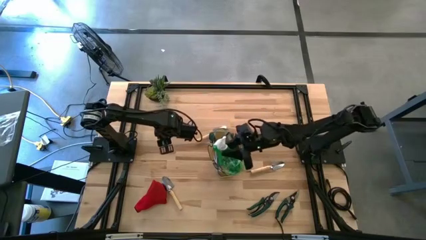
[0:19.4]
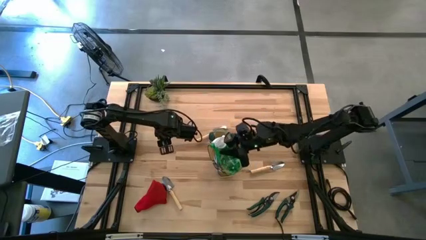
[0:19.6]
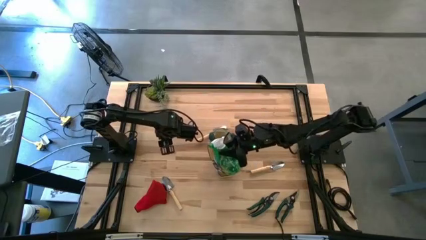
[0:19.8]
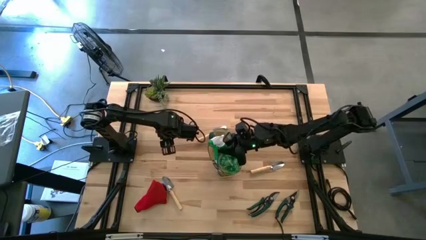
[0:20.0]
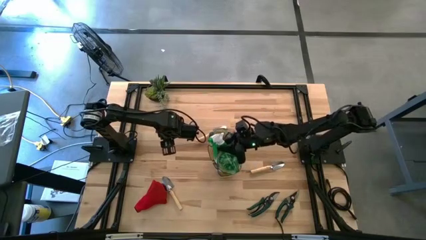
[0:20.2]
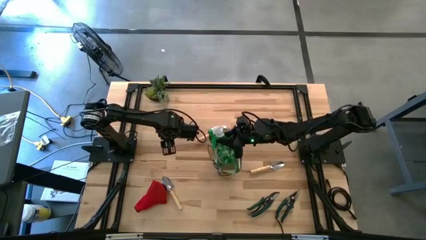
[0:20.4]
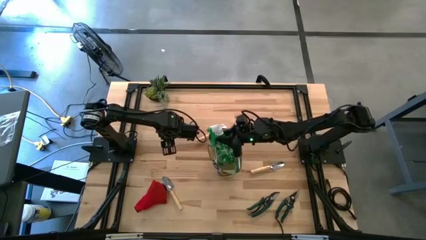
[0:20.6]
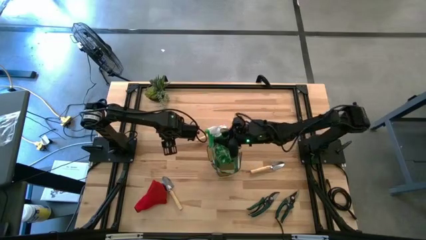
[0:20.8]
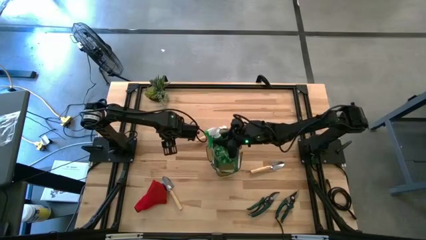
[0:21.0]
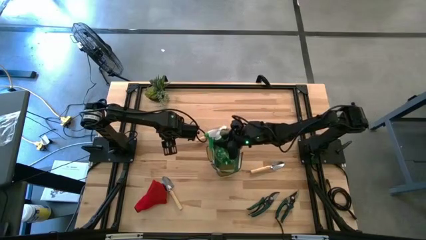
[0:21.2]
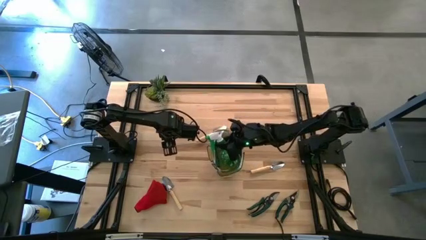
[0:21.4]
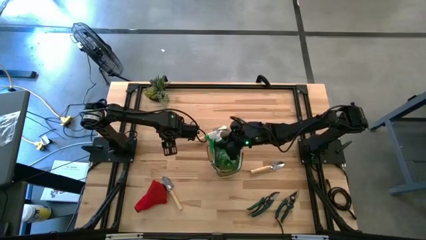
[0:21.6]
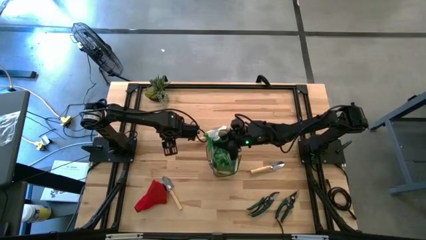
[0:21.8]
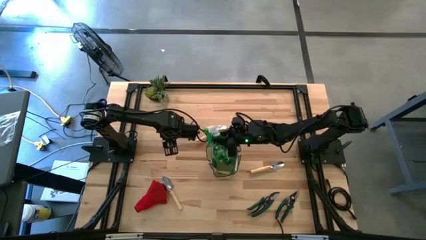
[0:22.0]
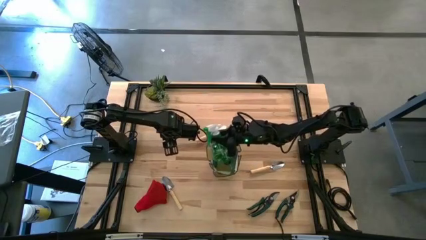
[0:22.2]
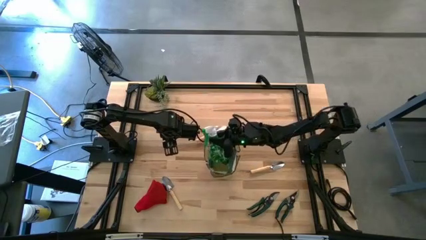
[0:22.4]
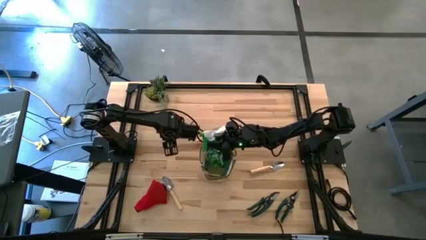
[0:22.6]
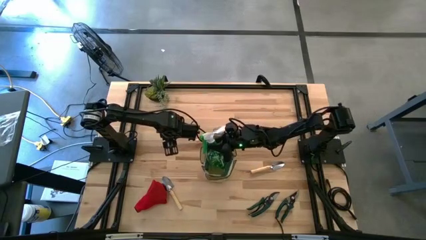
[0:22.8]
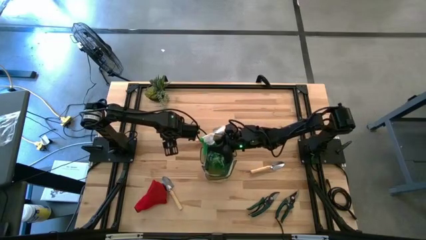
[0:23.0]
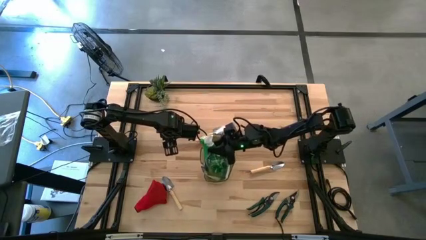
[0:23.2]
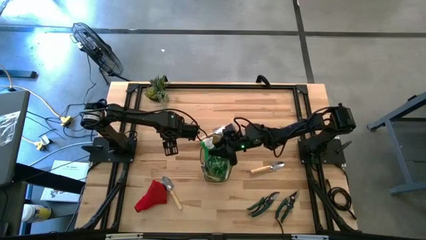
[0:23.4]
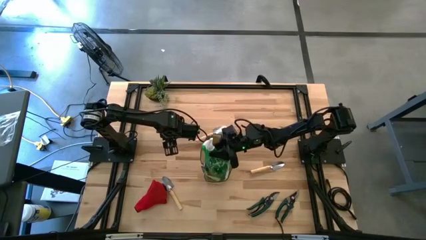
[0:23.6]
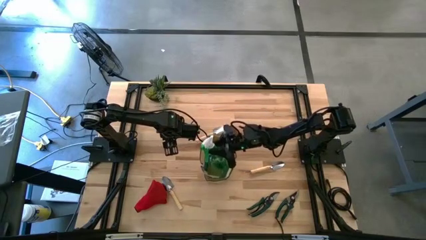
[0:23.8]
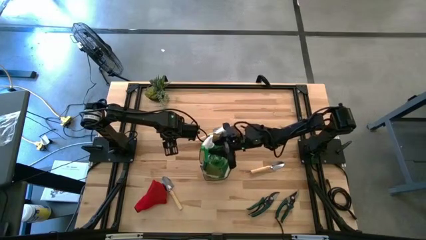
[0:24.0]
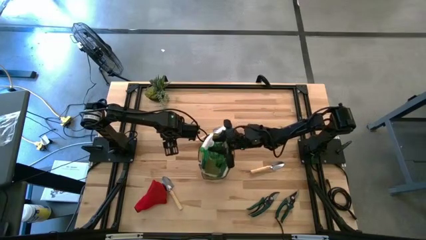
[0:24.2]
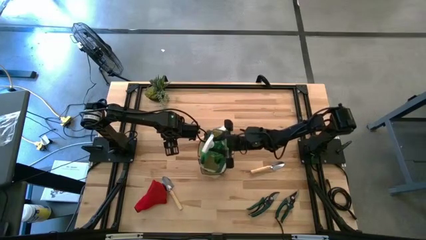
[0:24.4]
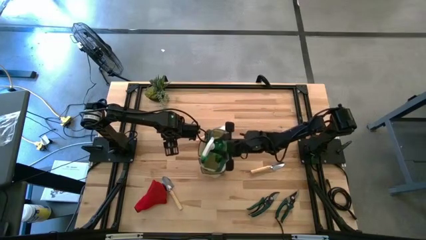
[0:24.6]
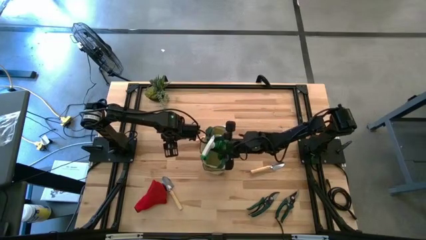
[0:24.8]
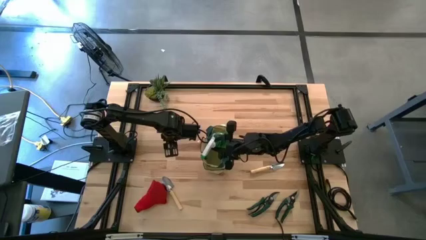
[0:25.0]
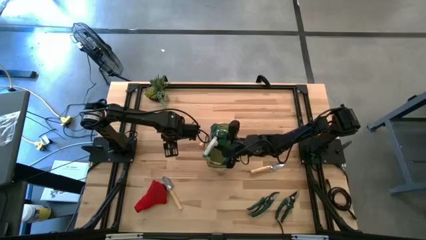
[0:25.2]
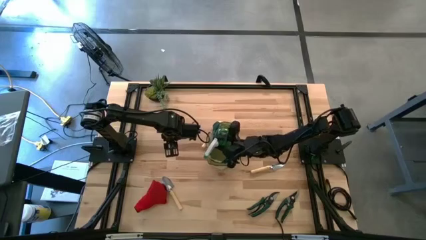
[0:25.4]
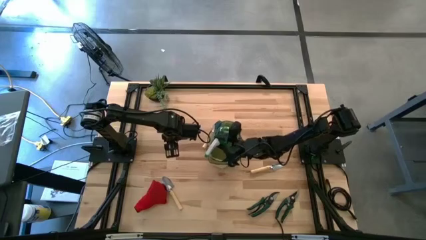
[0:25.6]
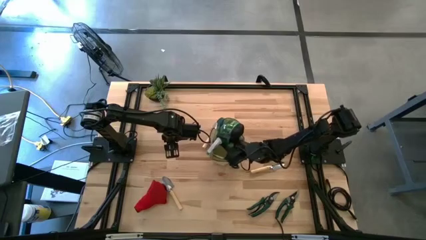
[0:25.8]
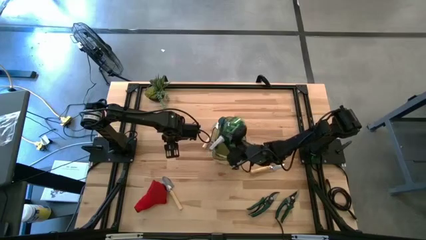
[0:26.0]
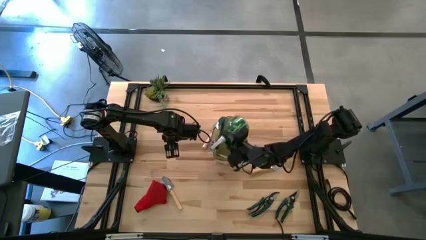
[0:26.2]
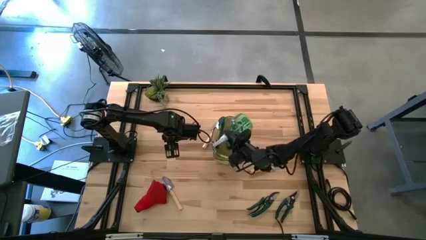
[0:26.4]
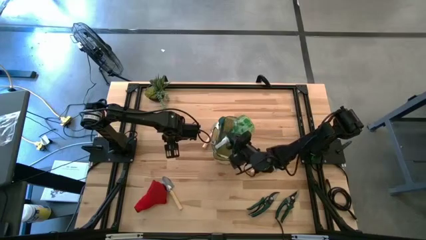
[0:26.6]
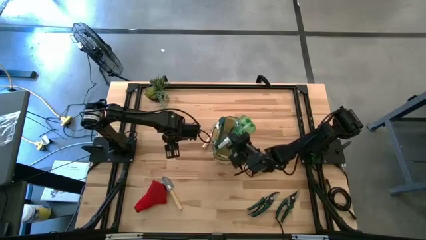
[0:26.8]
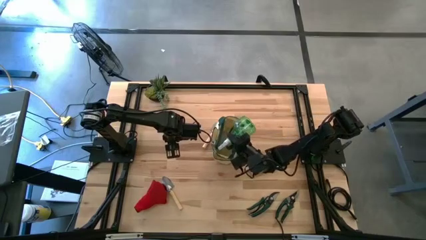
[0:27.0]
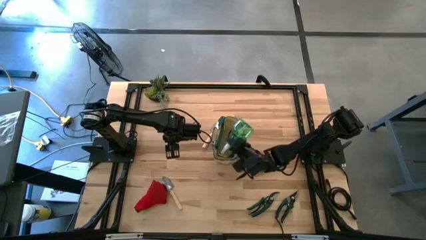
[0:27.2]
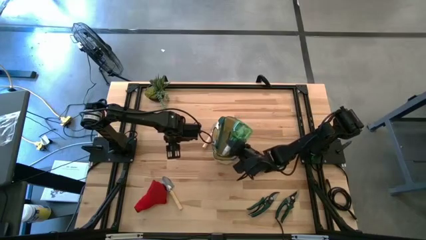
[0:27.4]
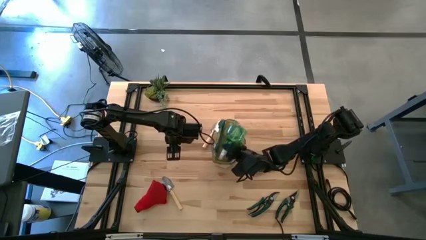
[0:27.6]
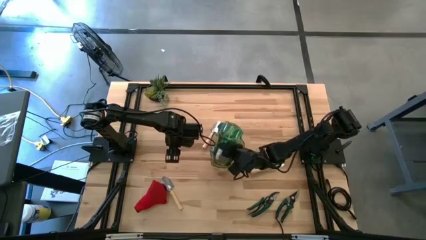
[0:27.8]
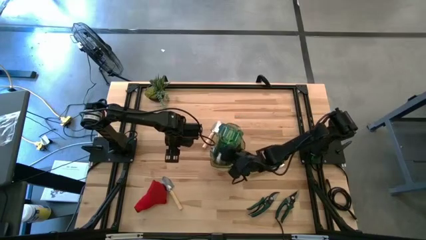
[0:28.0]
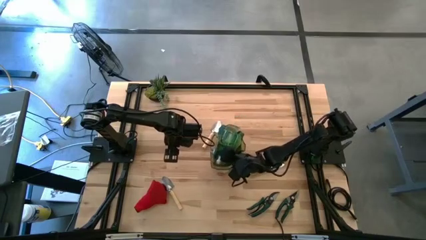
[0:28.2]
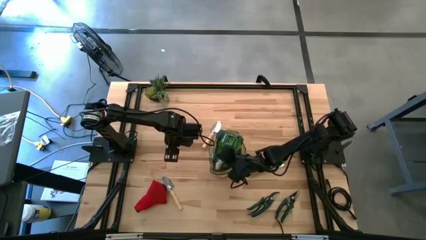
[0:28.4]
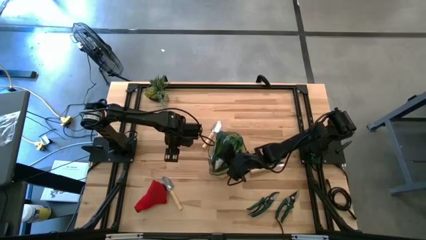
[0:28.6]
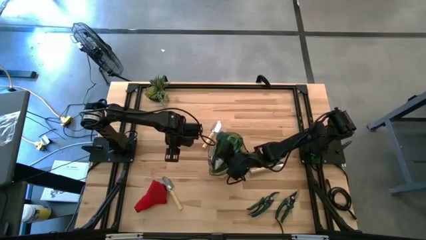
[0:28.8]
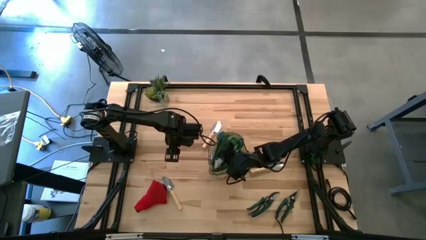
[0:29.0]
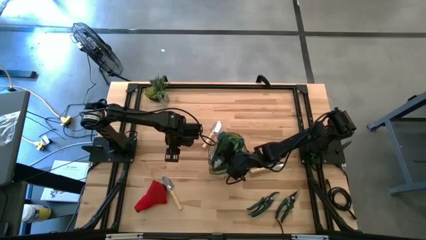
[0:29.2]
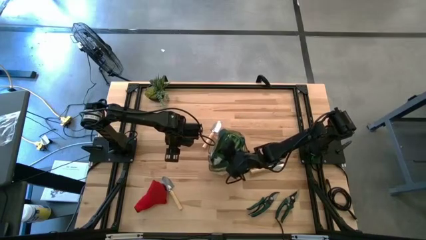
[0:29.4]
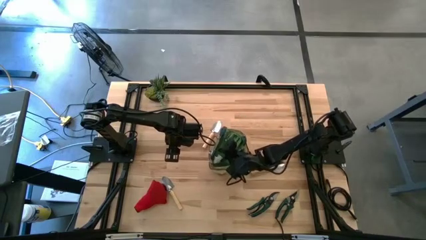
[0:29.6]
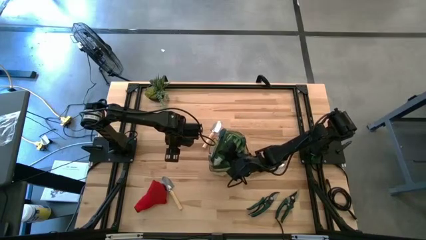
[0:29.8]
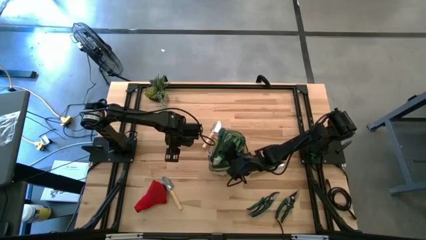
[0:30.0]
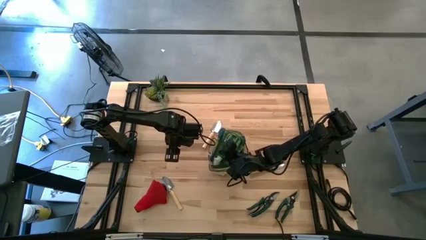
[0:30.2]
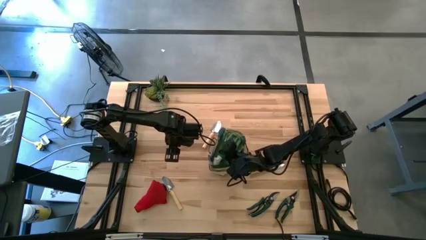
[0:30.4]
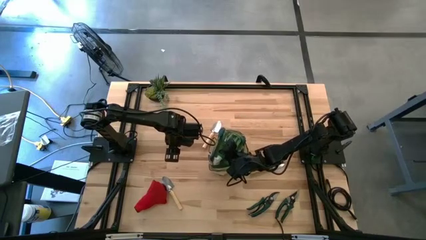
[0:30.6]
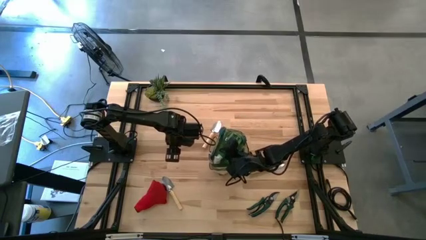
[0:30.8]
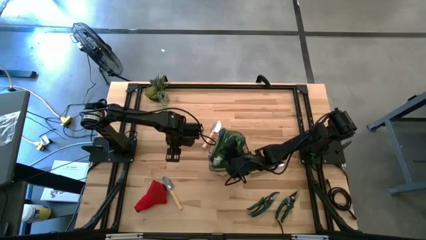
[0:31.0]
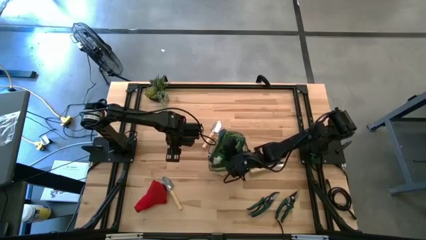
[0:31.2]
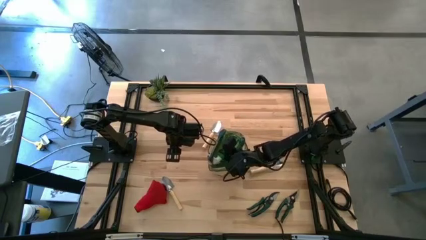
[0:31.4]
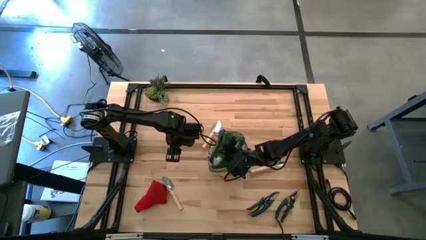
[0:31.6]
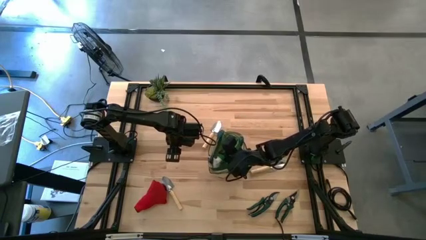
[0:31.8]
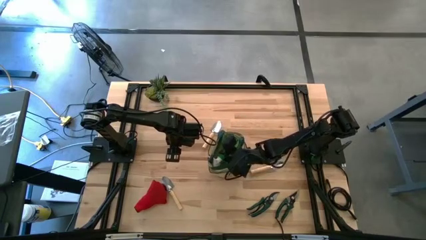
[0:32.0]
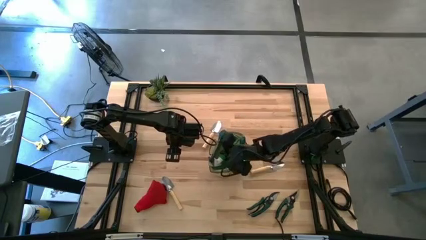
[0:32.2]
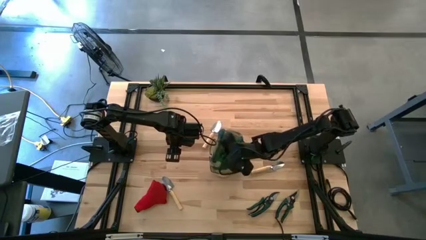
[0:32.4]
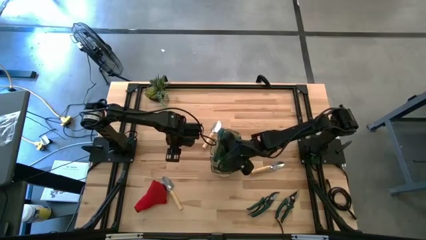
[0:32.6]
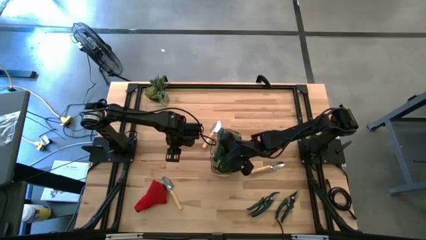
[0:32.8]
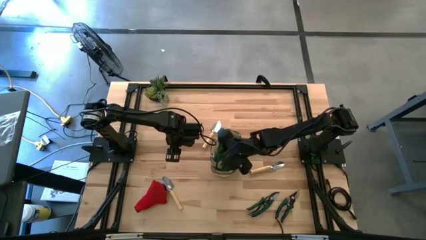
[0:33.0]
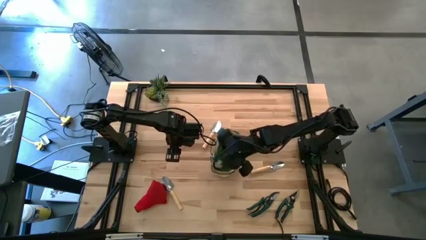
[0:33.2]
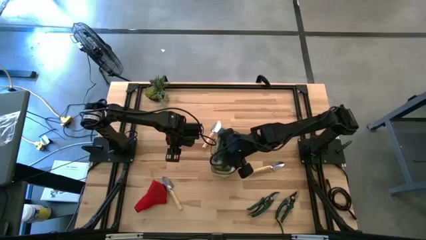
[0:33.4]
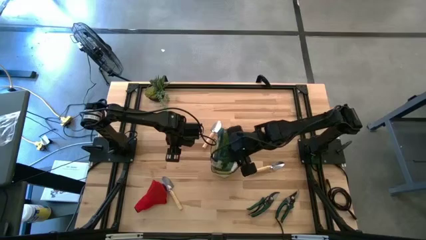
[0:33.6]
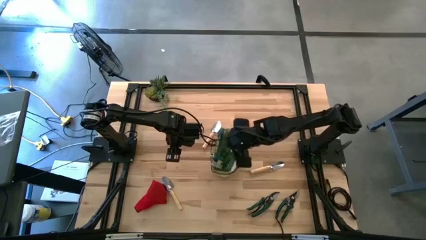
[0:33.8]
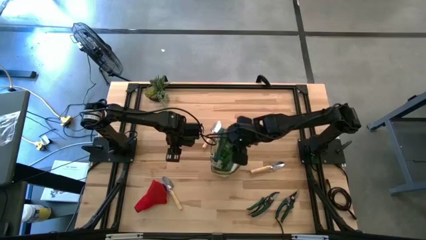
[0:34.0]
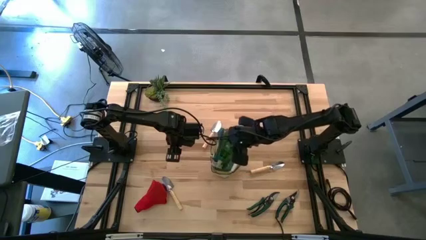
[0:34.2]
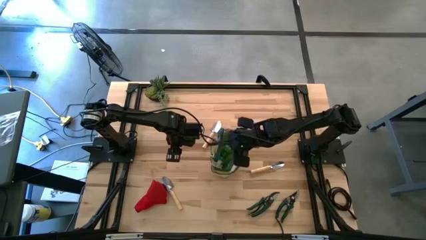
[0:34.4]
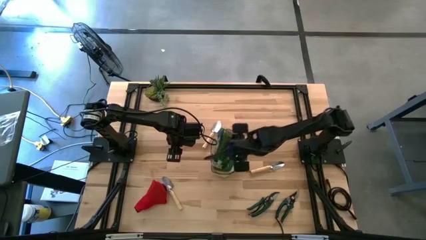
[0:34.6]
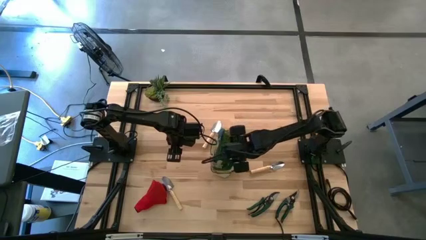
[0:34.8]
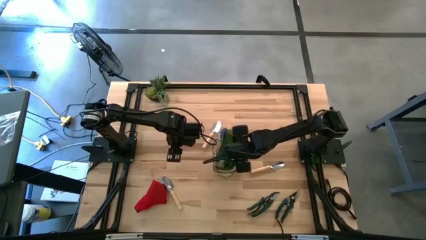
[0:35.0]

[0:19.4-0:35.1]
Task: Pick & Place Garden tools in Gardening bag
Put the green spray bottle into the light brown gardening bag

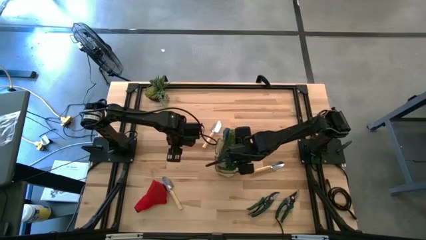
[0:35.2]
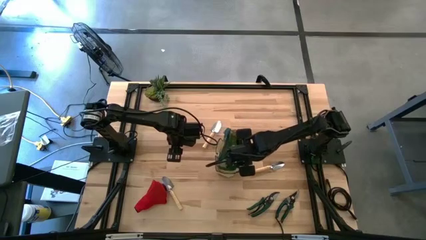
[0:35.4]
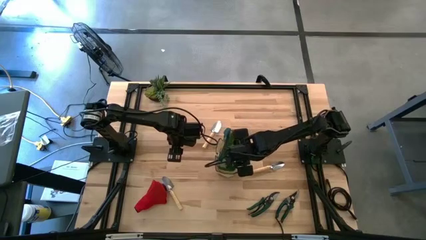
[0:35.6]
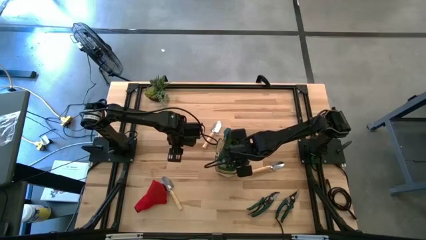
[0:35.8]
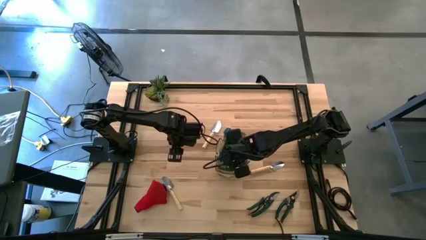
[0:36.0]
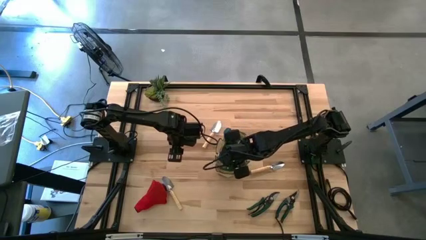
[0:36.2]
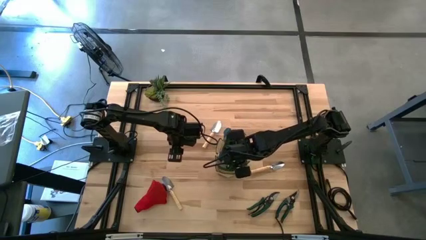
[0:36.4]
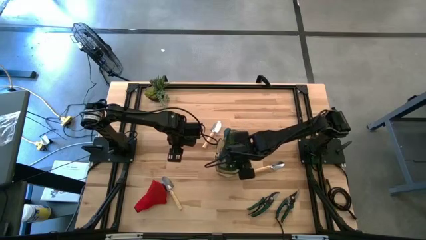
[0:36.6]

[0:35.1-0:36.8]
Adjust the light brown gardening bag on the table
